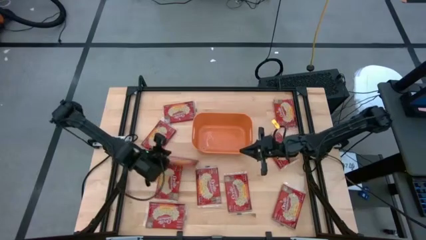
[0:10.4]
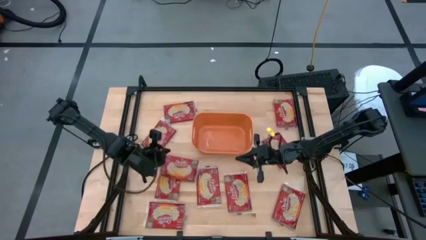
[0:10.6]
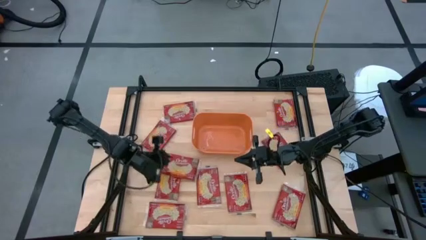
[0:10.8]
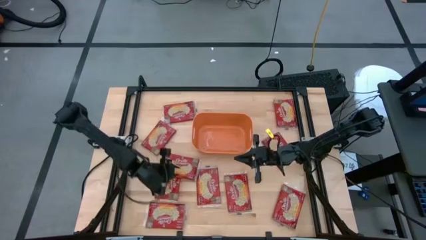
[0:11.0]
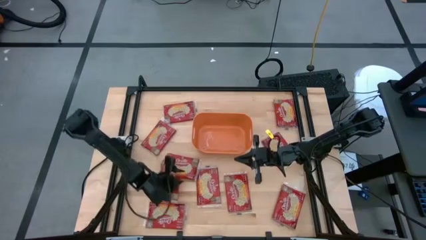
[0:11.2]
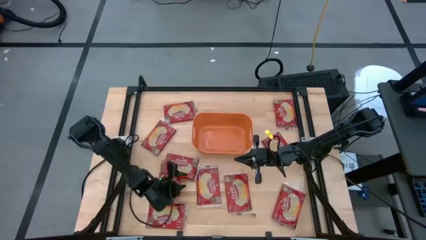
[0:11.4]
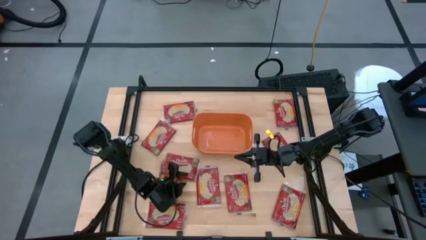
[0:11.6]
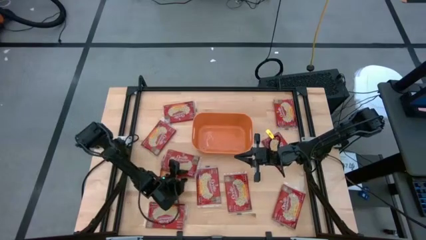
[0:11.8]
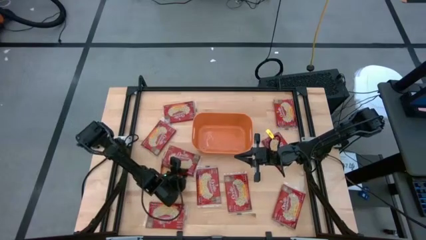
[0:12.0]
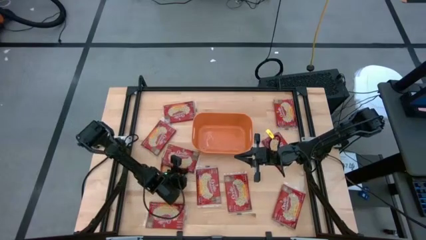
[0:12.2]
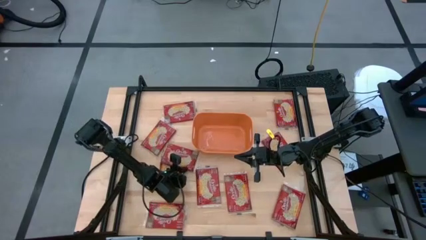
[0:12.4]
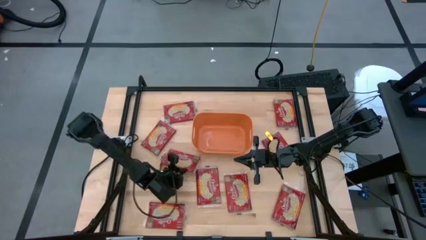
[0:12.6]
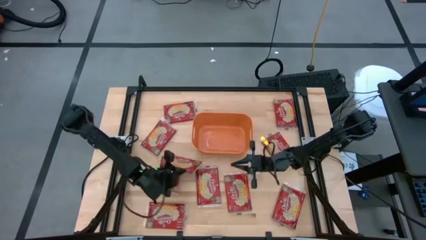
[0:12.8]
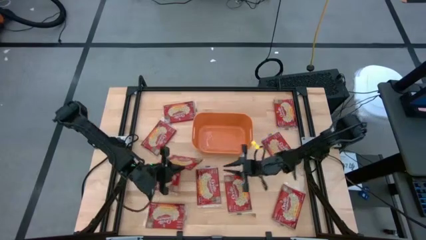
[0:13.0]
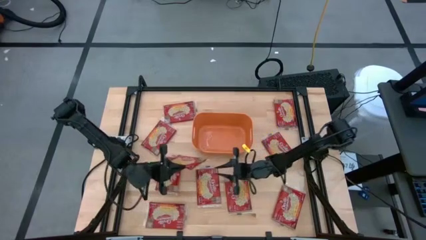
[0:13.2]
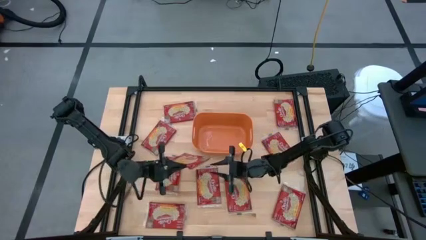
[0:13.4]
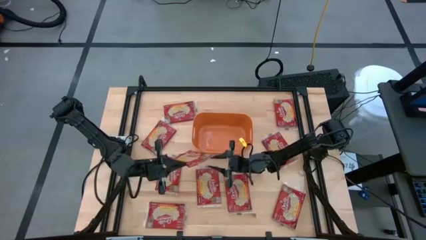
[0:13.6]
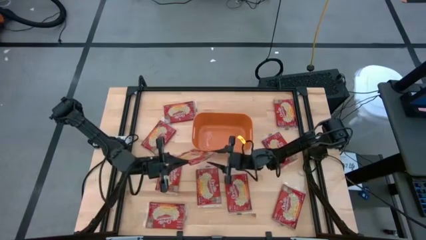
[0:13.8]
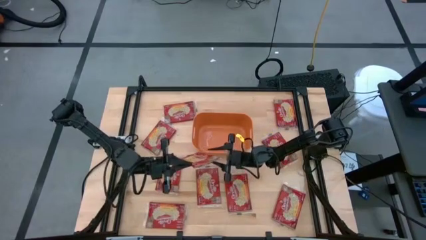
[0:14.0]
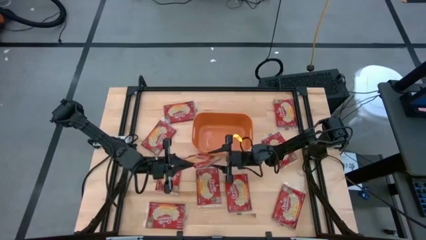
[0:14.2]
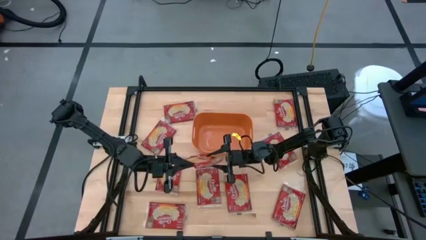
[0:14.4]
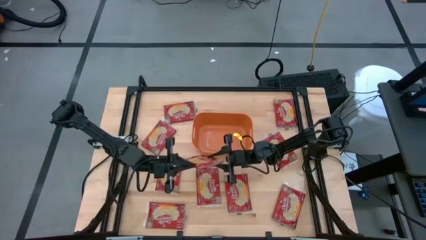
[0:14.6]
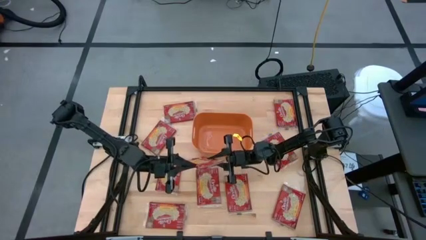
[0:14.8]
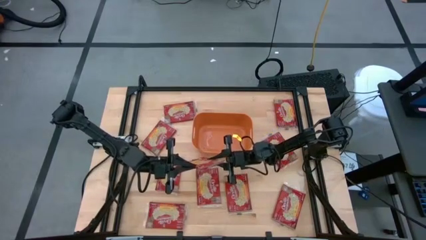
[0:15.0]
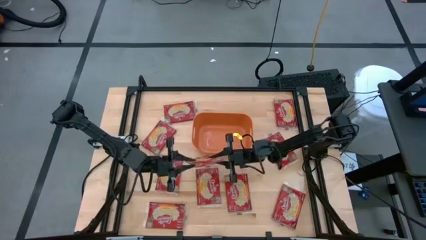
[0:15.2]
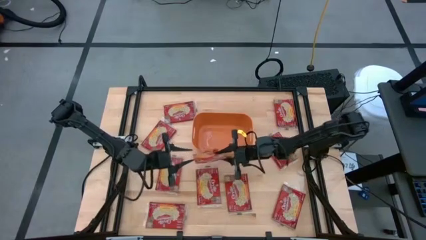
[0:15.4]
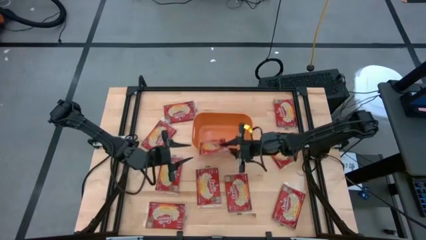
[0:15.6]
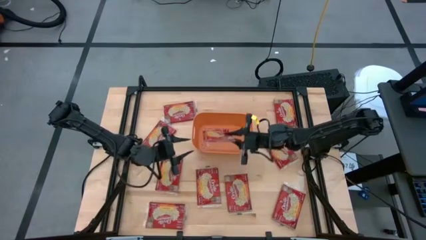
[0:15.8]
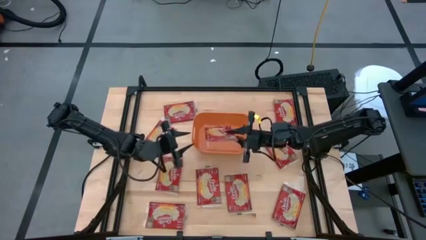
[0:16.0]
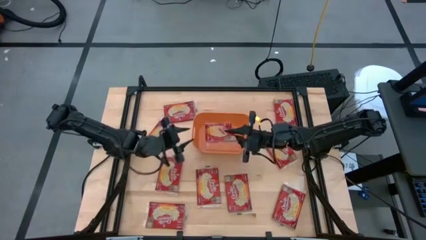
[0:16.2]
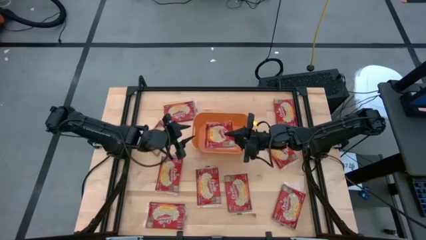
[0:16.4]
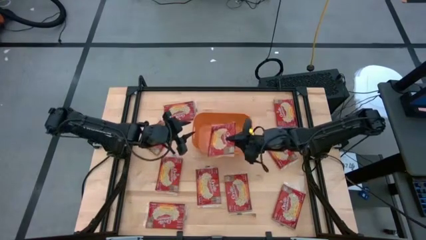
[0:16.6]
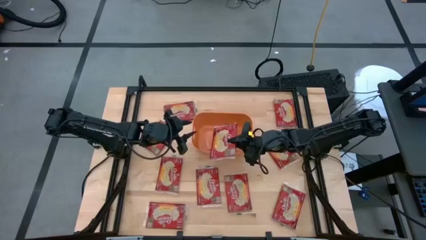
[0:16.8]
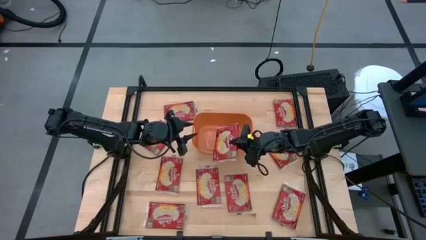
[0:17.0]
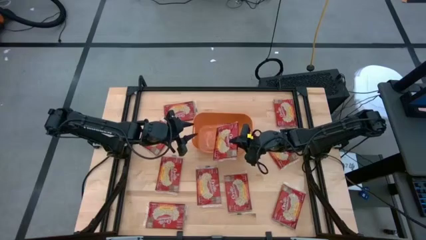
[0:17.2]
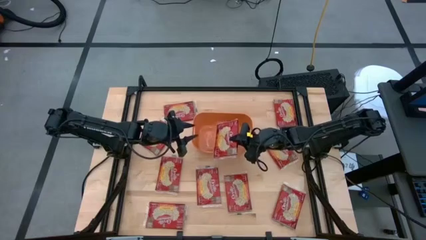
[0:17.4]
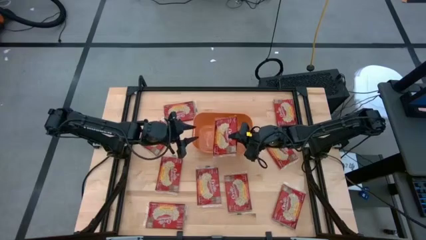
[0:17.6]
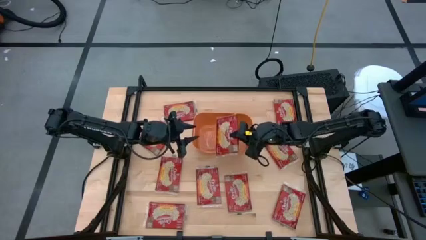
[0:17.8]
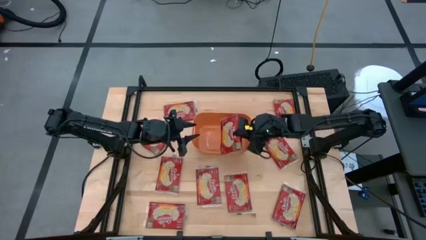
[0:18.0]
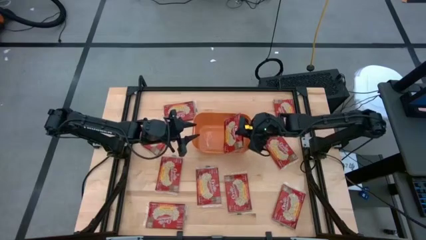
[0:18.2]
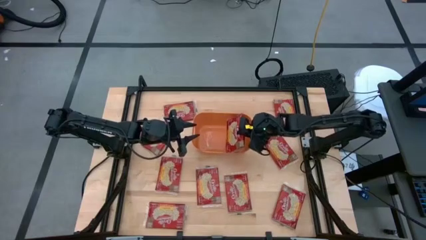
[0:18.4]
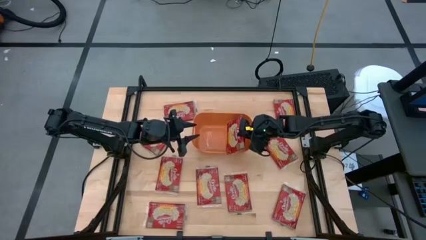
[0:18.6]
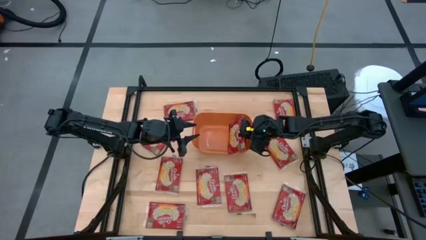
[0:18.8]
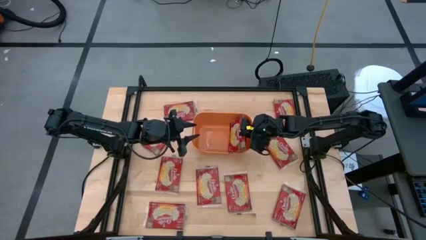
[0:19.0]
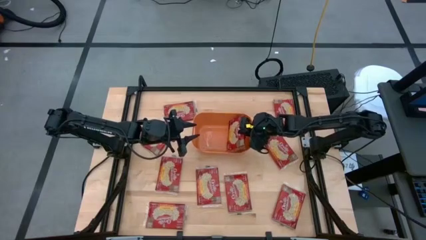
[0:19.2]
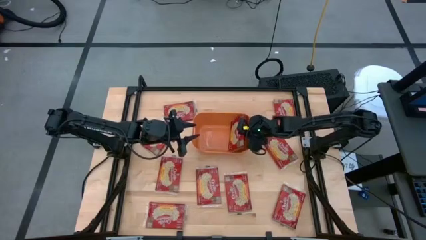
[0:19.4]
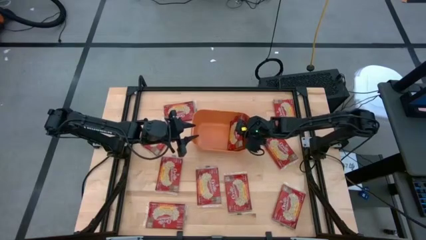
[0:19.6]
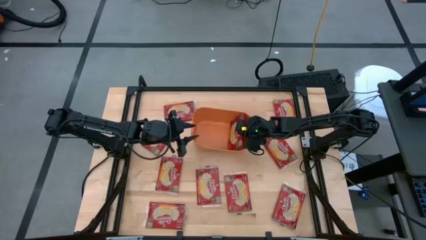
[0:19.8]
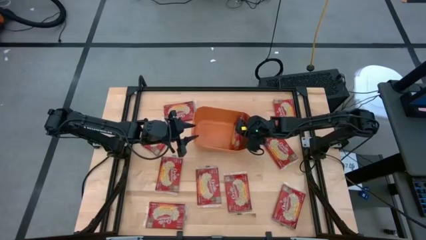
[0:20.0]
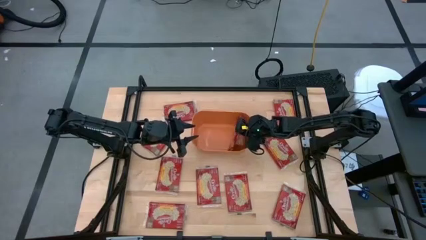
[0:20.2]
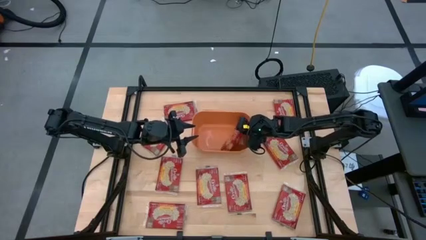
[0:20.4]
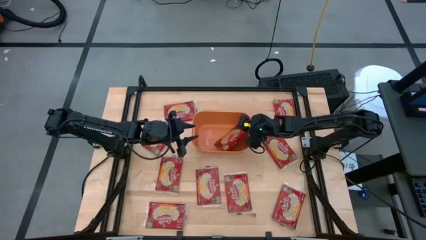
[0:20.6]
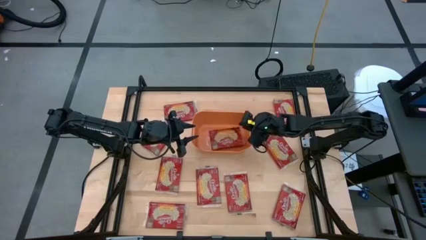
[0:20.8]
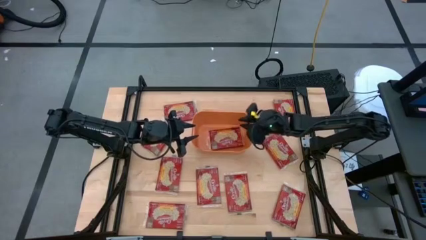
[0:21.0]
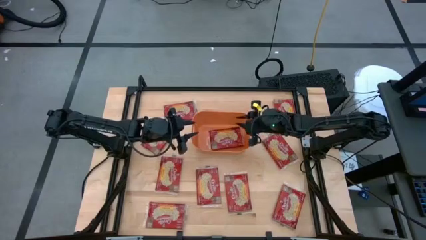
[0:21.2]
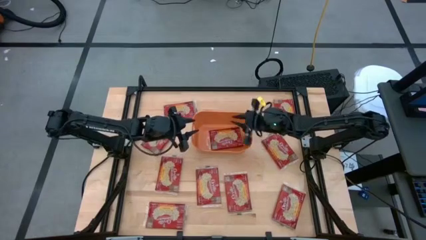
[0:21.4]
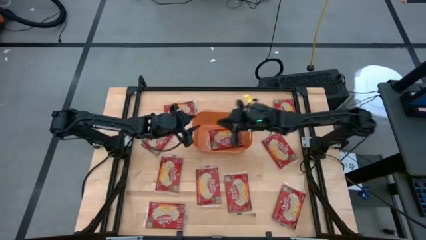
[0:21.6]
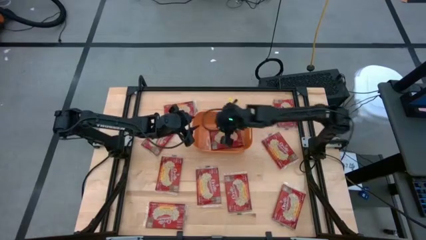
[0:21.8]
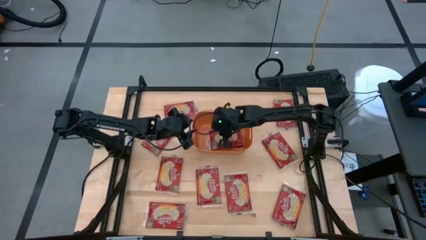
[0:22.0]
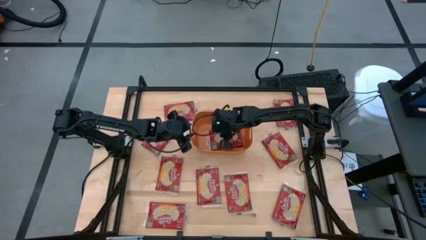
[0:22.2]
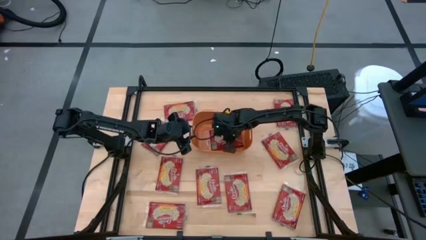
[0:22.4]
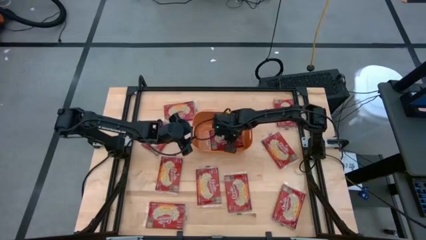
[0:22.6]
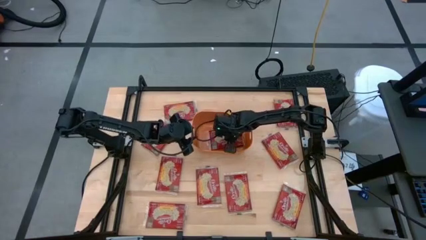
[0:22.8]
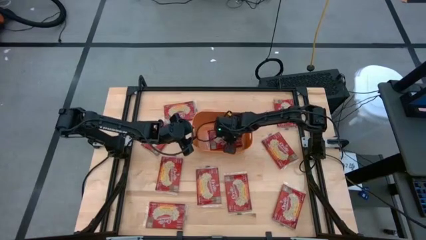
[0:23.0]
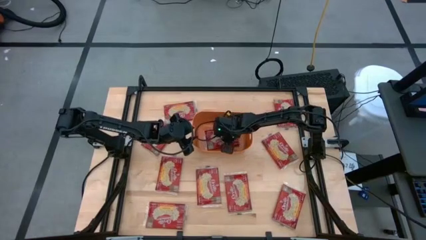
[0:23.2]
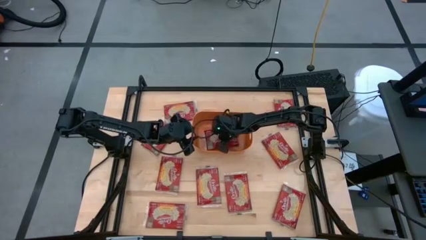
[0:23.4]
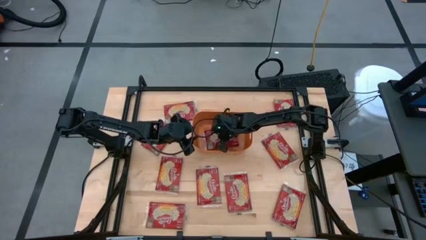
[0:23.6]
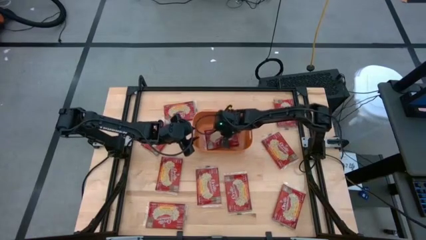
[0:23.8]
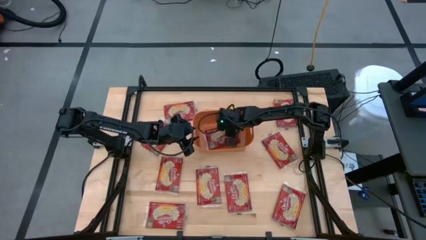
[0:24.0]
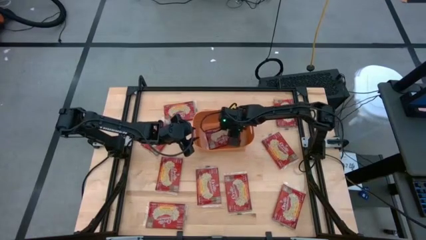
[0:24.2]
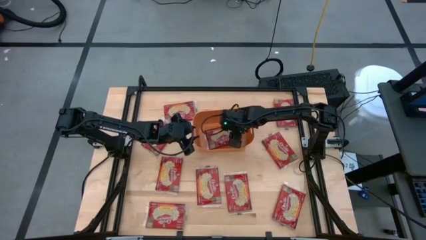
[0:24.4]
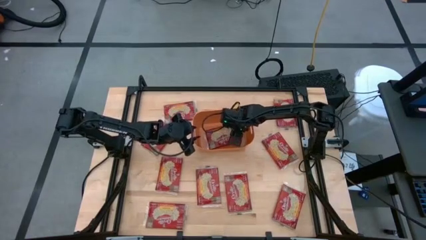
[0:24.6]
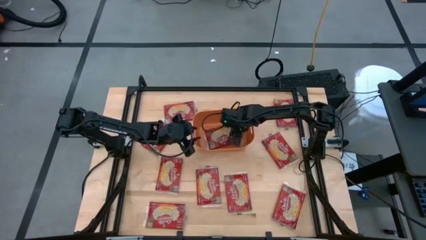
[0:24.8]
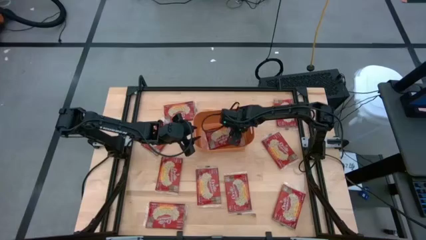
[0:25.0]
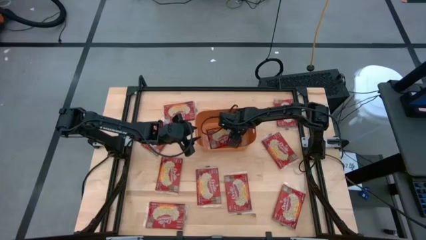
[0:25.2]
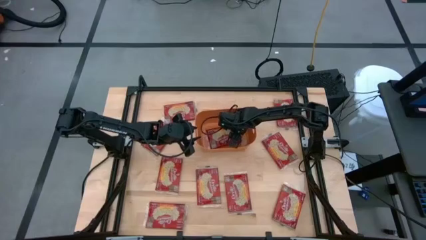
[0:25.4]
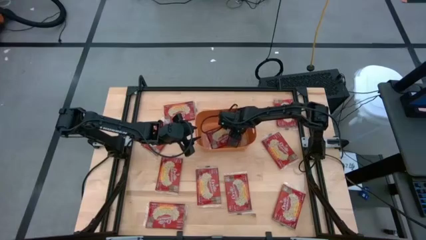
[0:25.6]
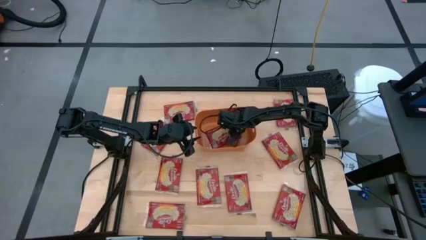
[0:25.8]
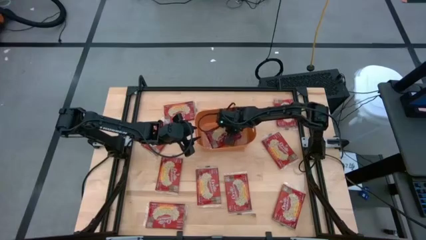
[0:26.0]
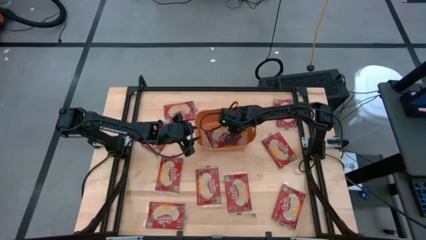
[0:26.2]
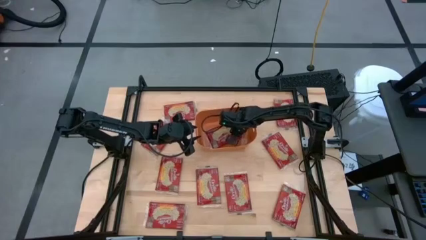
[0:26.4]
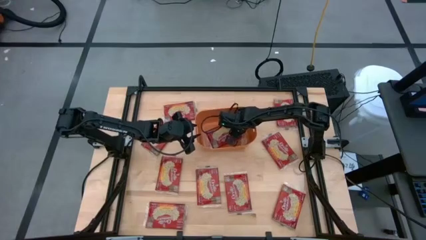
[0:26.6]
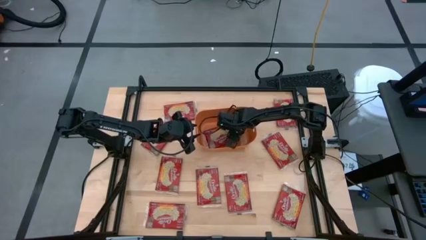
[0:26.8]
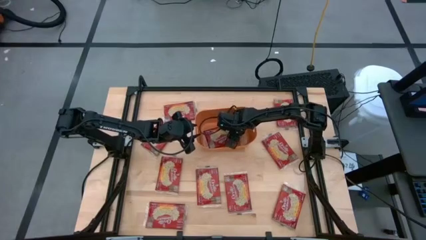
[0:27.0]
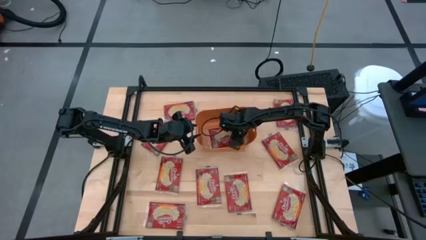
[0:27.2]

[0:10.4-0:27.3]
Task: Sort popcorn bags into baskets
Put the red popcorn bag into the orange bin
